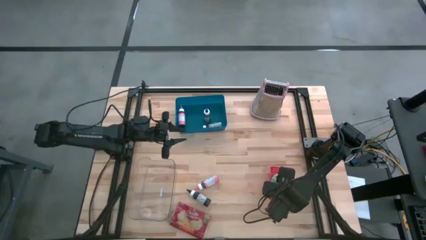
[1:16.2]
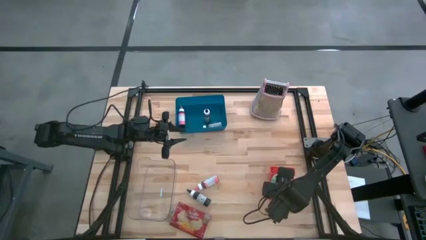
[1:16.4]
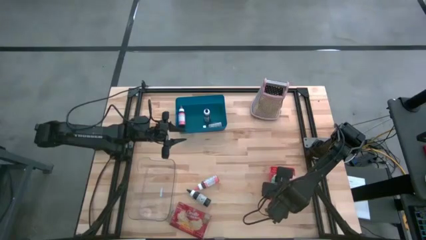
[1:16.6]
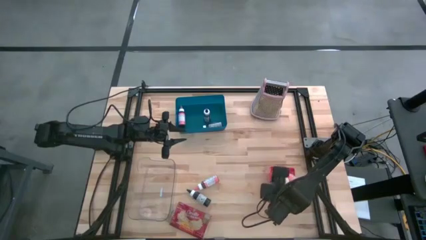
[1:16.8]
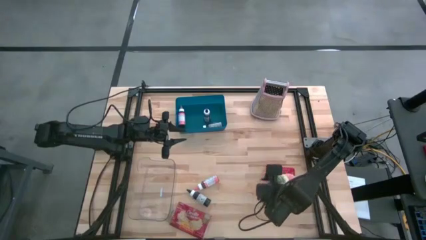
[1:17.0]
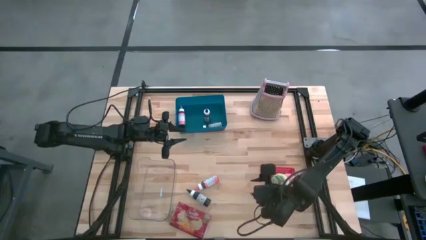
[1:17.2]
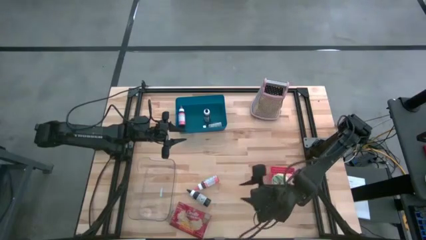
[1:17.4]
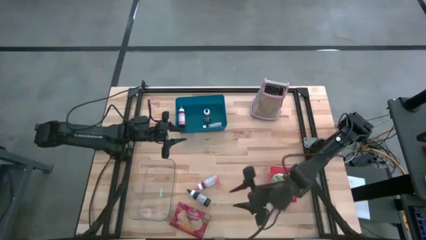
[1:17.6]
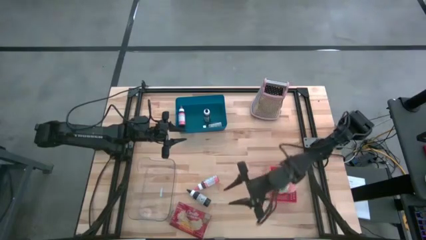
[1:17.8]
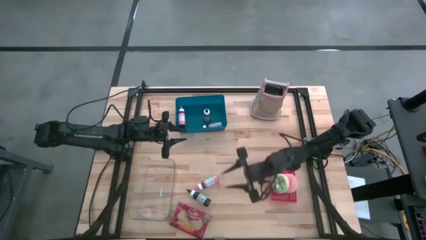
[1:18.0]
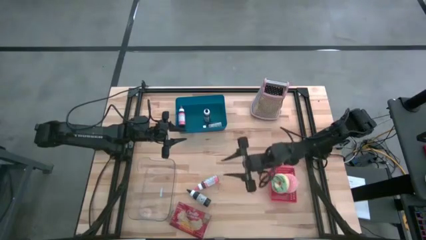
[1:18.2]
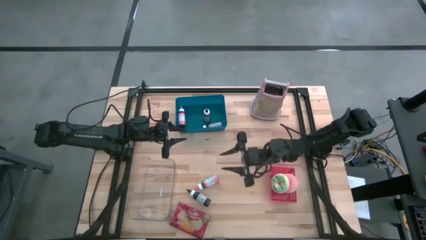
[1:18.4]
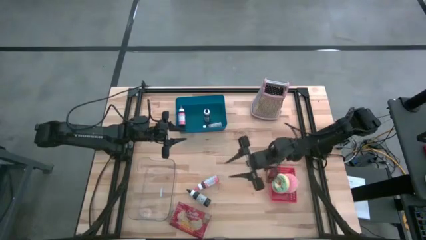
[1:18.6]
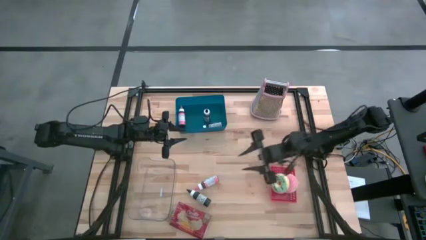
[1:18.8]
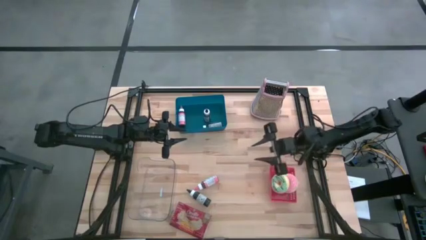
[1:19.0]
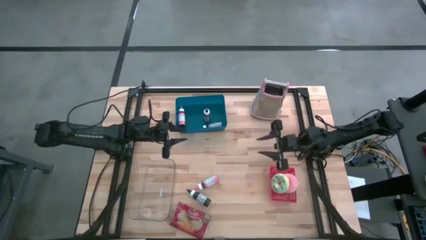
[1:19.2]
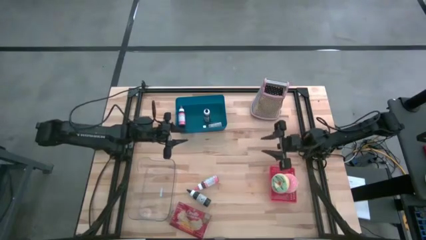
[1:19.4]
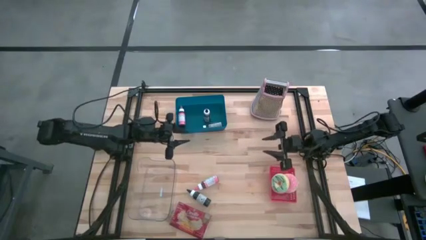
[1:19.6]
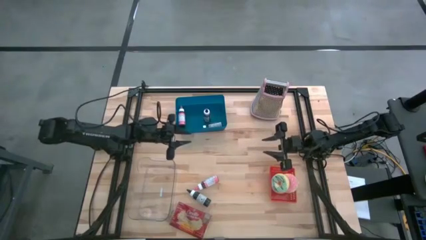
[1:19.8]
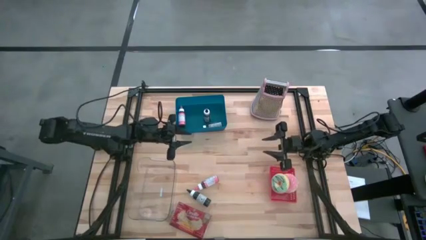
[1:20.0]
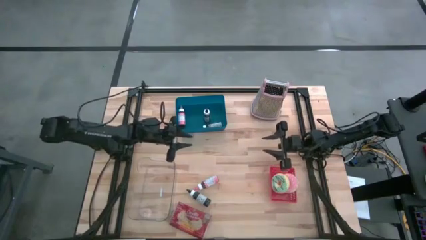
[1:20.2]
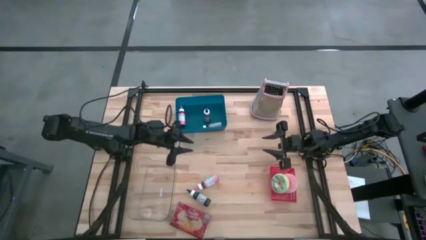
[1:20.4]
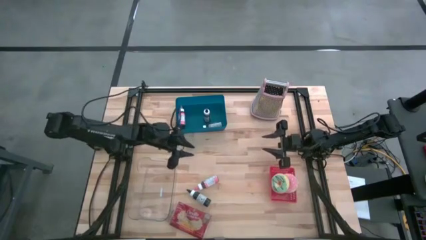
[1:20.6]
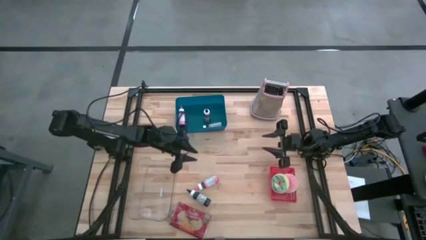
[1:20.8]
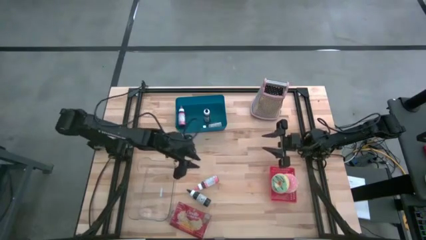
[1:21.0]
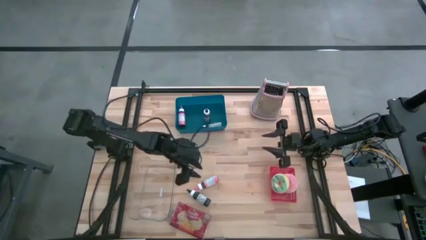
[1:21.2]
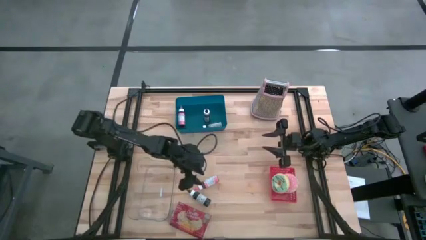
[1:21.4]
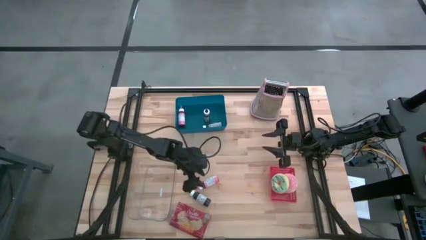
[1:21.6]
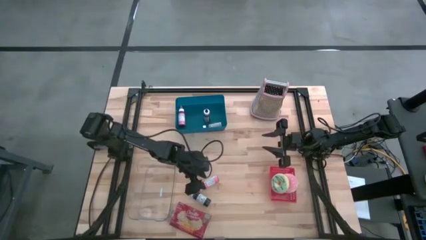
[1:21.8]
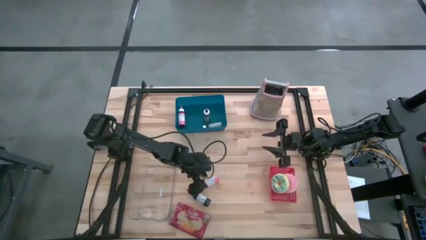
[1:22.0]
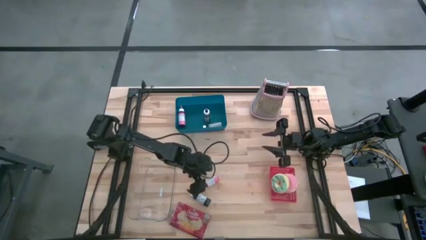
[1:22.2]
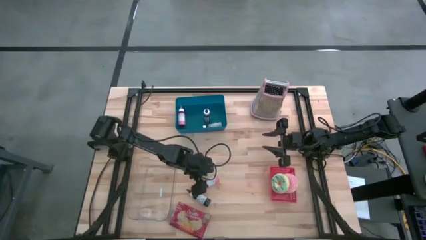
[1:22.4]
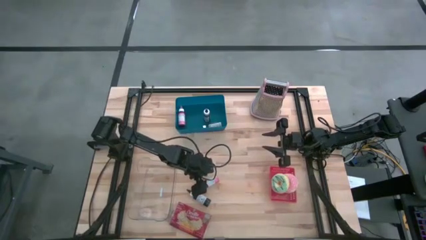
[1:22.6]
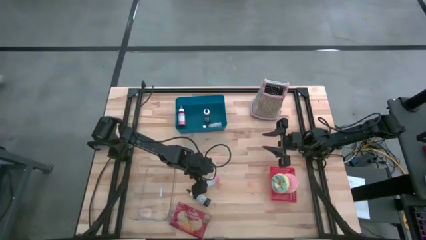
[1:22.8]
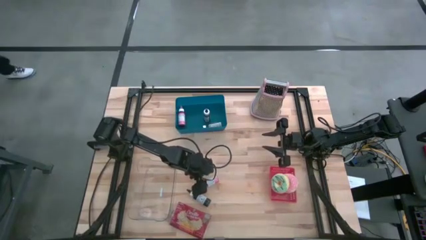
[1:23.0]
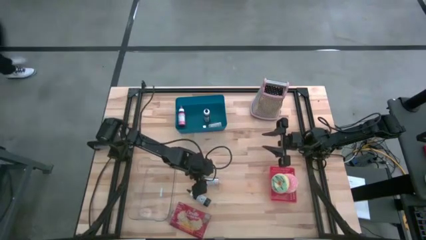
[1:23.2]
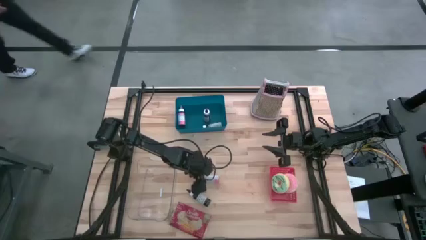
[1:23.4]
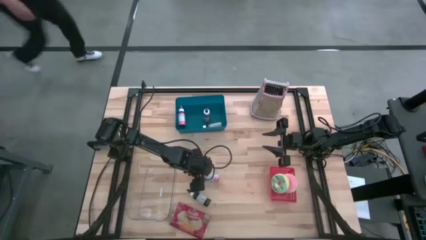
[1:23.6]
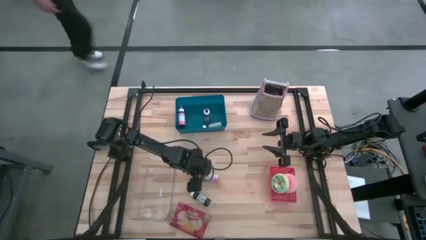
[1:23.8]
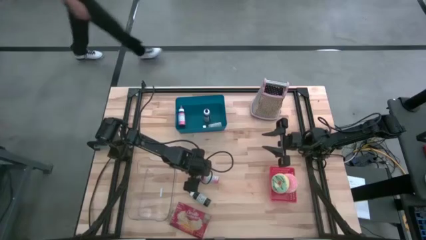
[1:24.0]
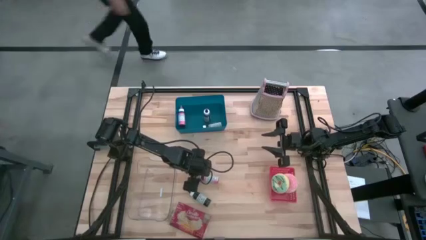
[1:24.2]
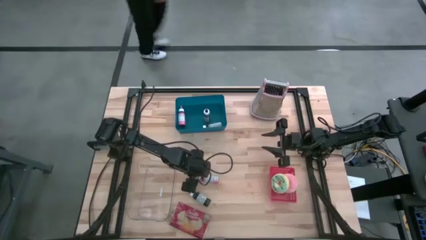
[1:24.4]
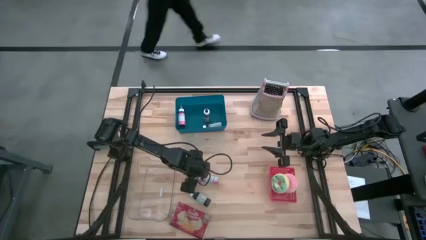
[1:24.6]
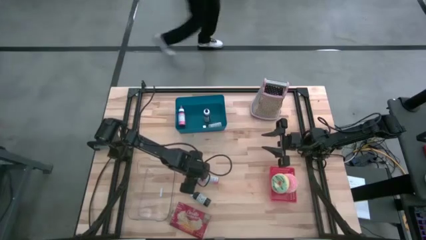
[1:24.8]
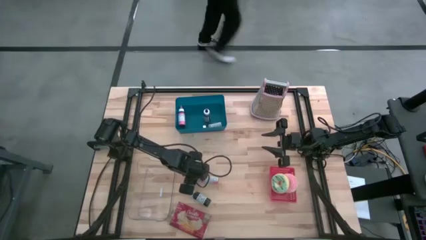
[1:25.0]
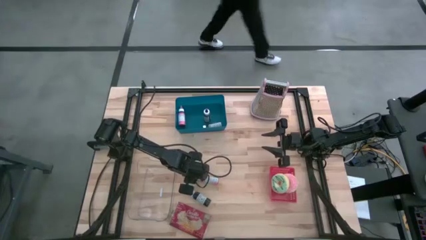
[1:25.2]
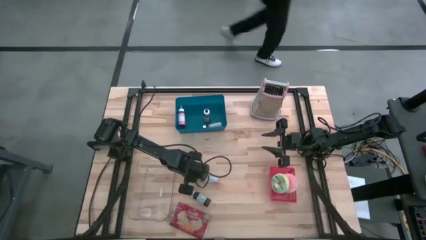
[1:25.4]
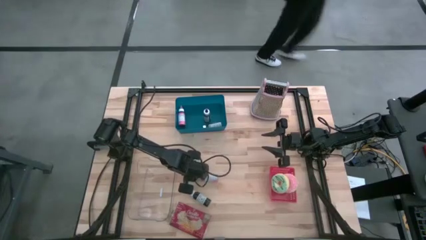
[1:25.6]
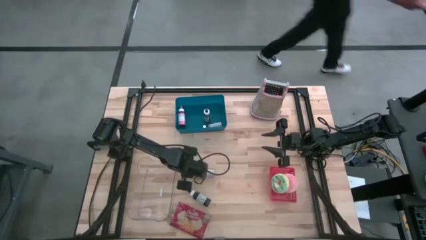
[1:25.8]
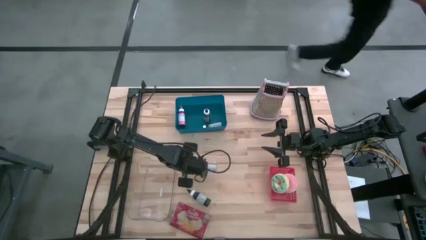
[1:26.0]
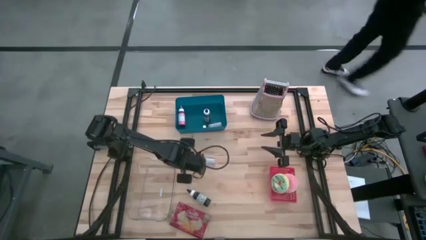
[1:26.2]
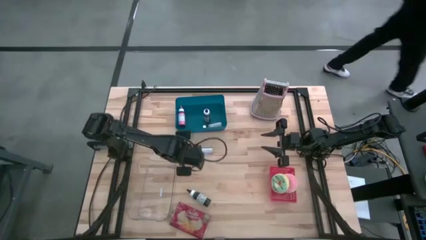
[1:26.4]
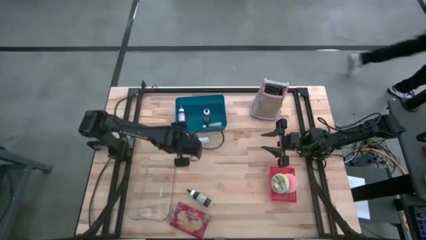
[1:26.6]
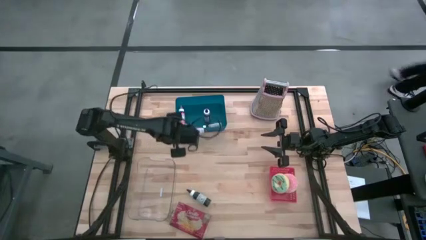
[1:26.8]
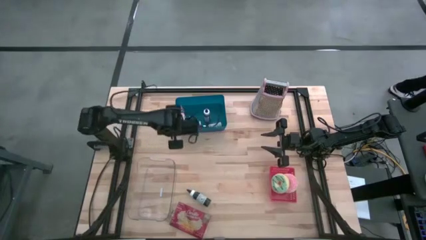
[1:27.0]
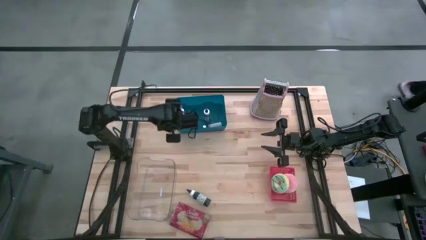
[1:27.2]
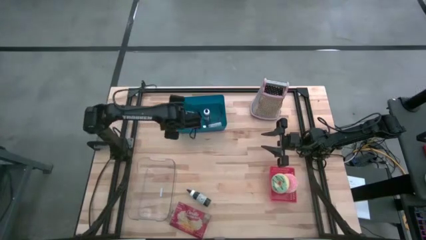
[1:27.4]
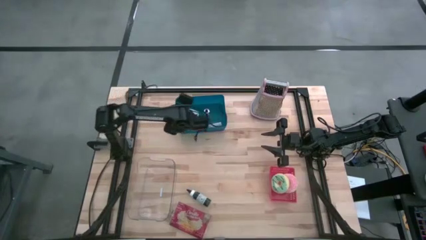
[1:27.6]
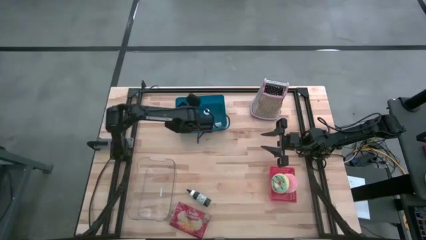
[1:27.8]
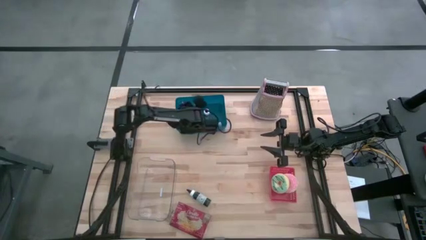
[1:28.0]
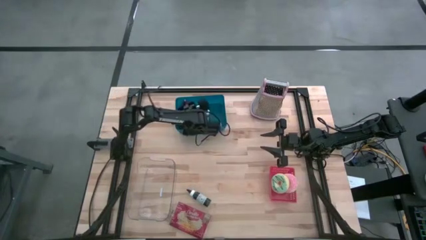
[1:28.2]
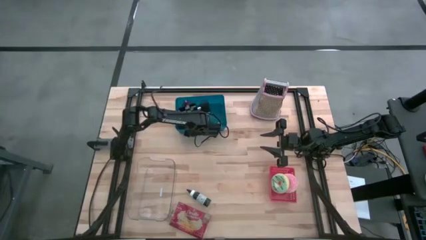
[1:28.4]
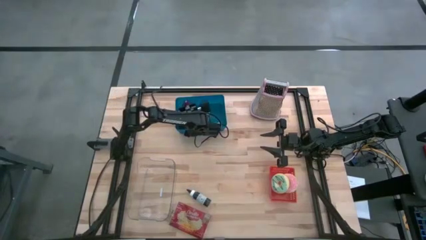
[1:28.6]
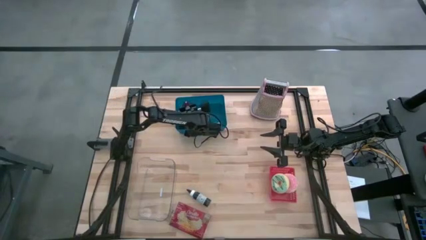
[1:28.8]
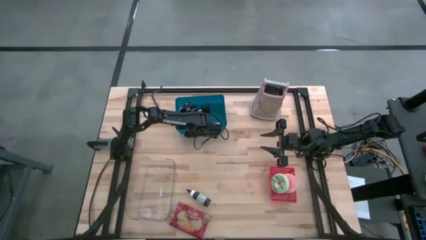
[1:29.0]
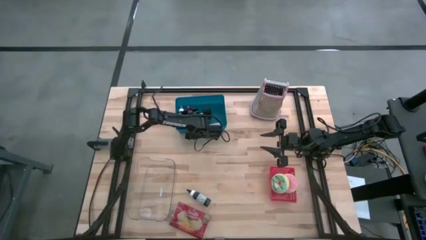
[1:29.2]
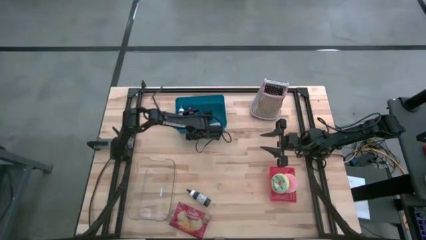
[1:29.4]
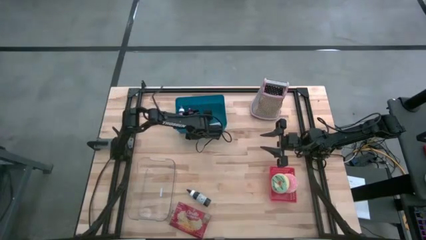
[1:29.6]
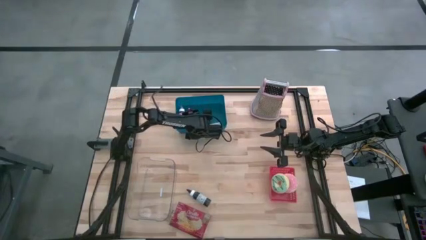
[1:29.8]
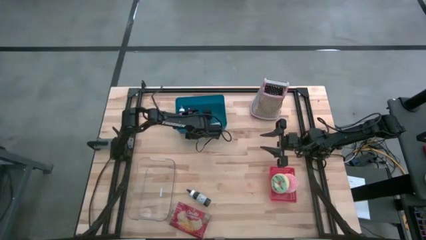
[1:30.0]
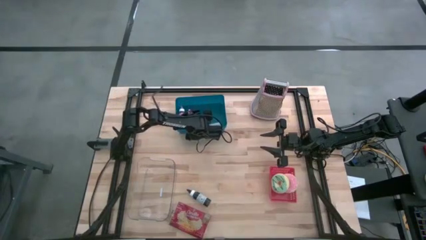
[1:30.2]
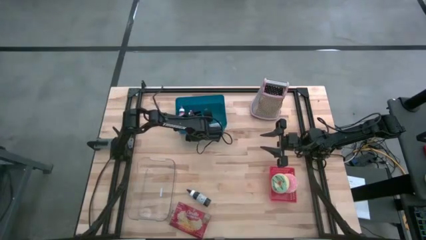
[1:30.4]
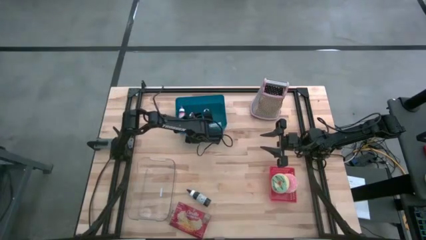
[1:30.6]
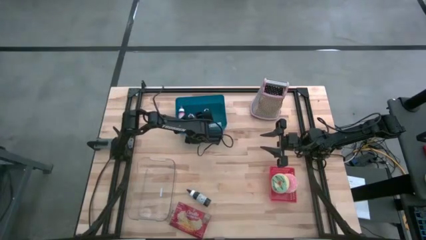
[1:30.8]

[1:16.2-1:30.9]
Task: Pick & Place Food Item
Put the pink food coloring bottle into the blue bin

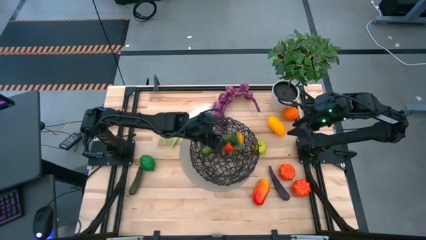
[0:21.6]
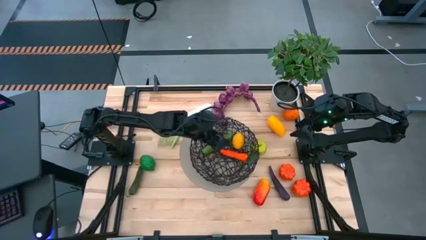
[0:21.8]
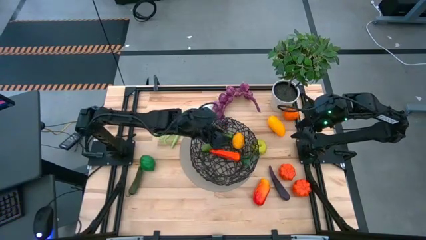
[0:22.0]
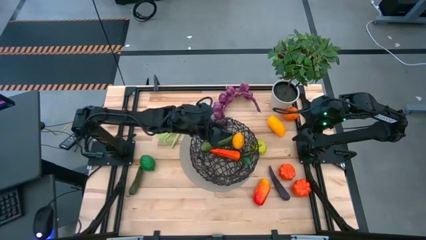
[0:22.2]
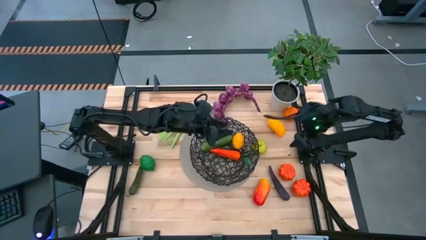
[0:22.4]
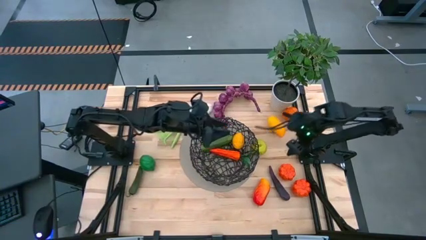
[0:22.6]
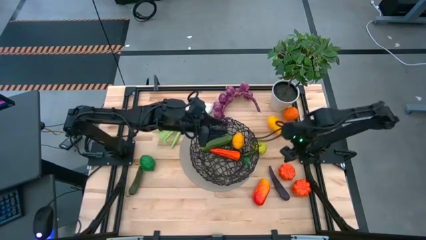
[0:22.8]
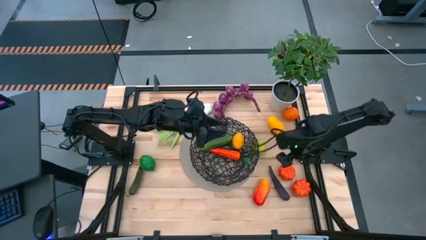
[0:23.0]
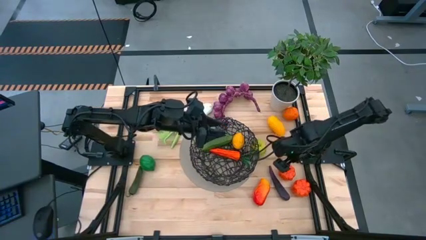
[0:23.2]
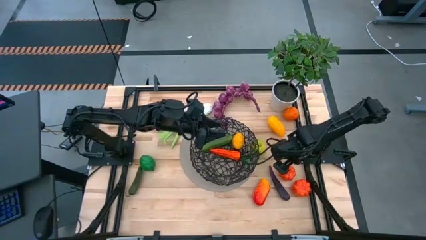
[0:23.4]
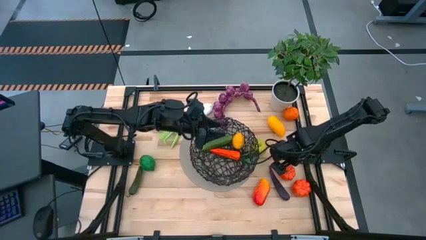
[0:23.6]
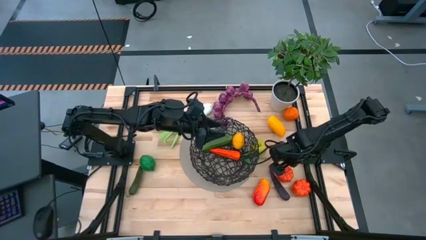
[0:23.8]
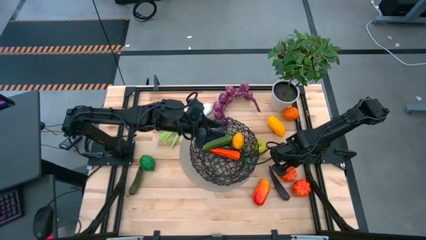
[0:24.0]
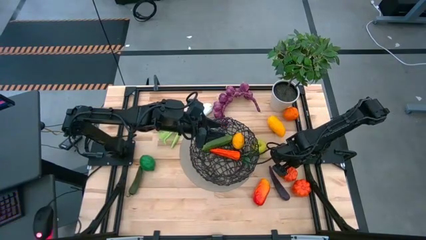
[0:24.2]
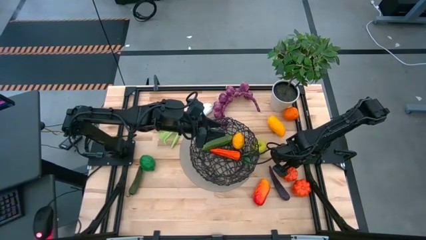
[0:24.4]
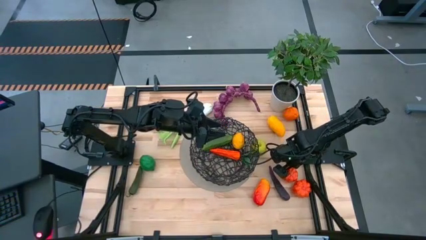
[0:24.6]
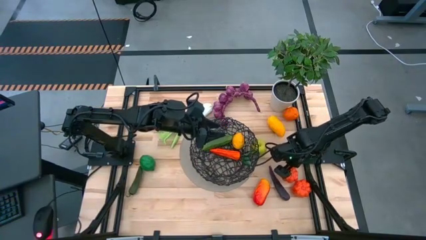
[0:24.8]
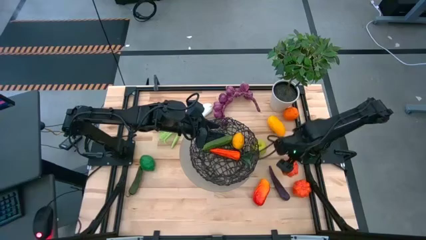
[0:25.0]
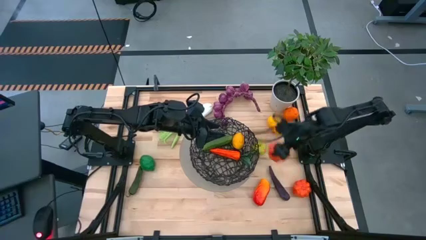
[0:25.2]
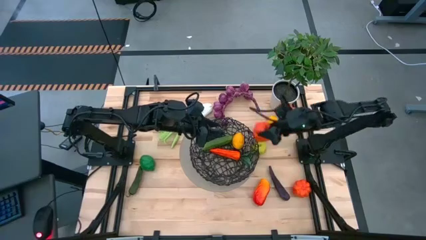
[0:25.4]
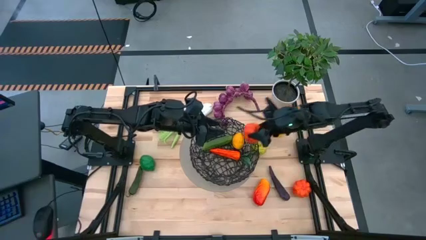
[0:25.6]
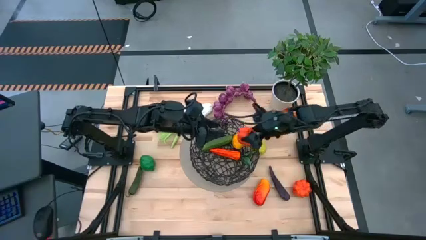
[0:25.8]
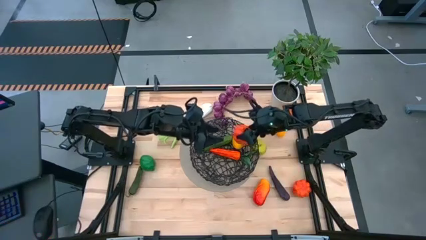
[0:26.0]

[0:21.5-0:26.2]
Task: Build produce basket
Put the orange squash into the black wire basket
